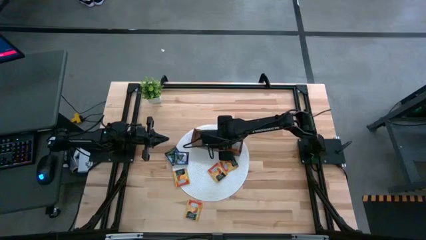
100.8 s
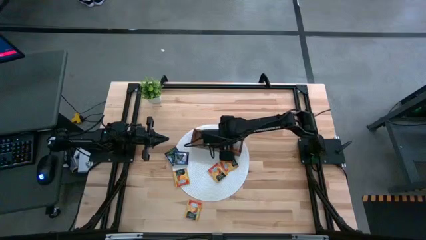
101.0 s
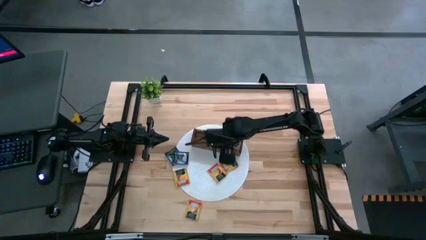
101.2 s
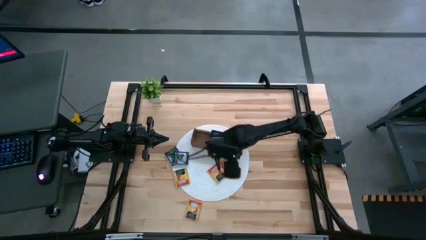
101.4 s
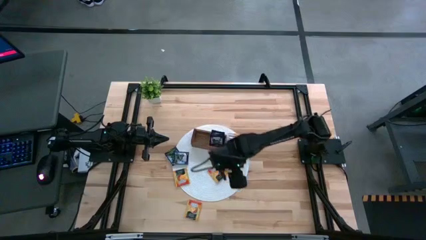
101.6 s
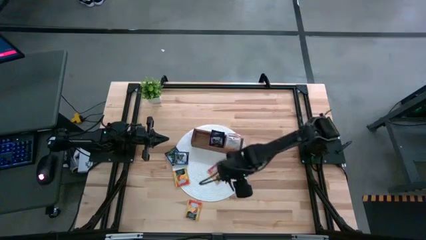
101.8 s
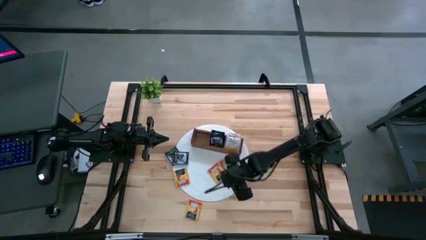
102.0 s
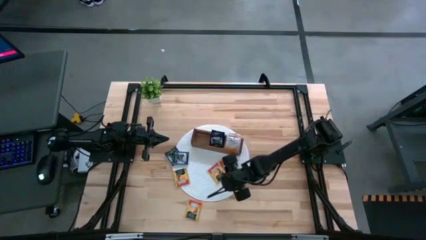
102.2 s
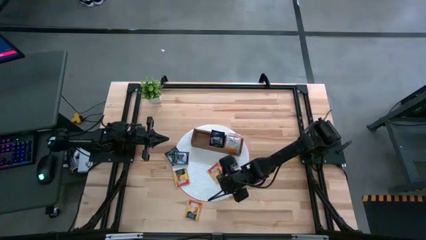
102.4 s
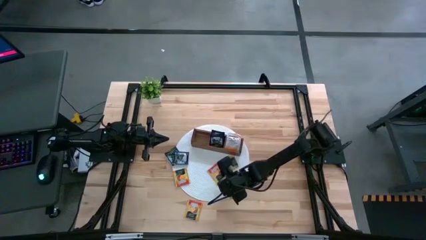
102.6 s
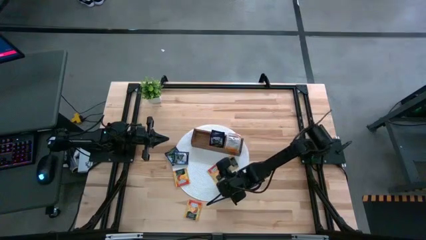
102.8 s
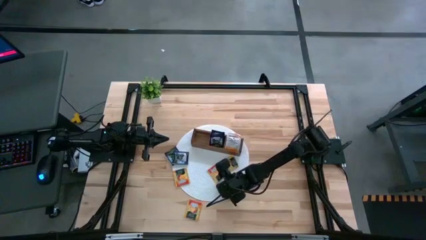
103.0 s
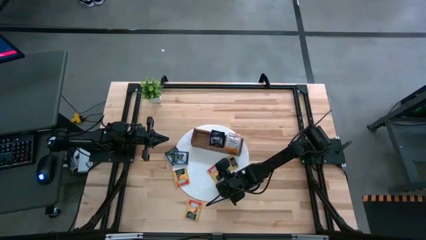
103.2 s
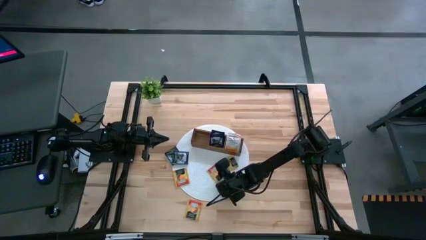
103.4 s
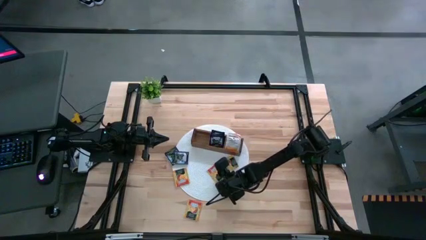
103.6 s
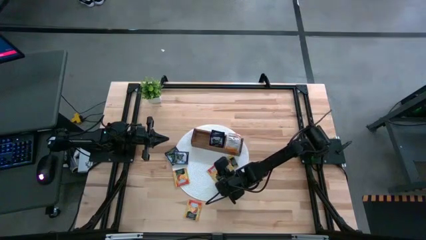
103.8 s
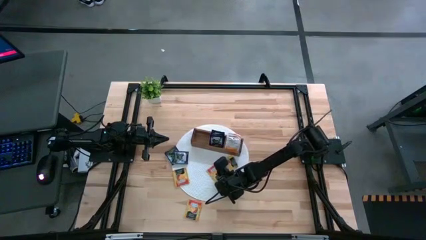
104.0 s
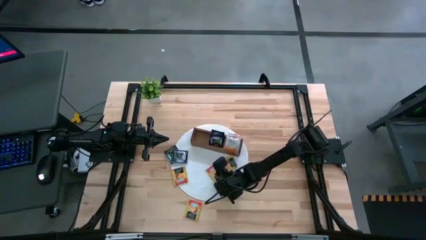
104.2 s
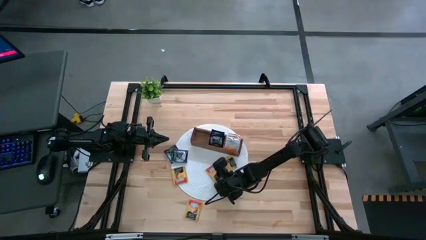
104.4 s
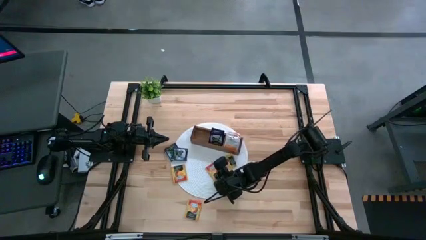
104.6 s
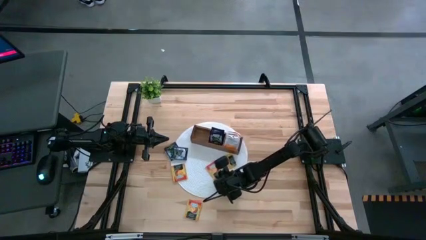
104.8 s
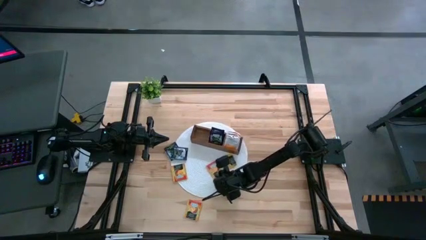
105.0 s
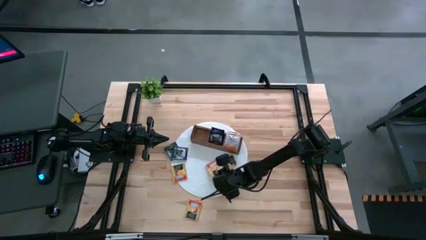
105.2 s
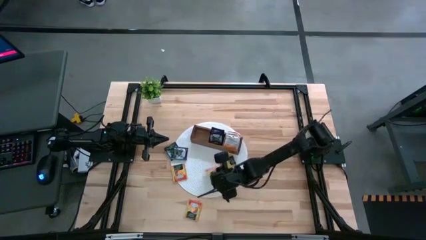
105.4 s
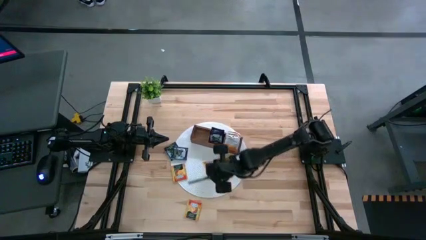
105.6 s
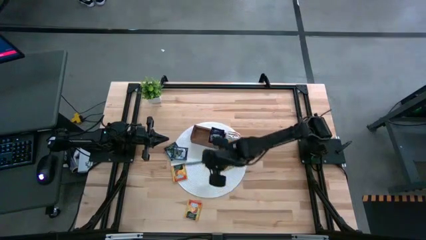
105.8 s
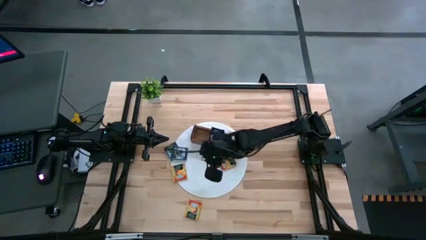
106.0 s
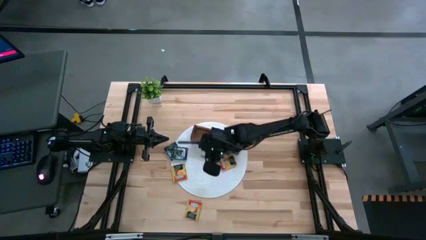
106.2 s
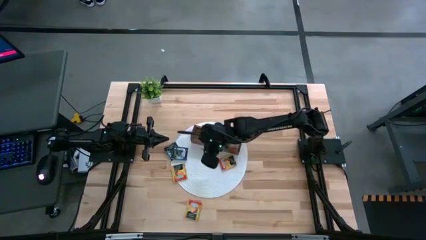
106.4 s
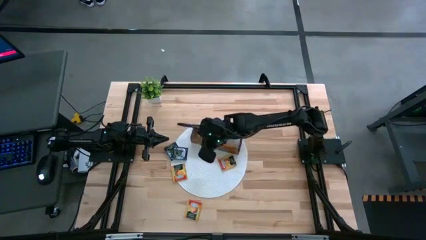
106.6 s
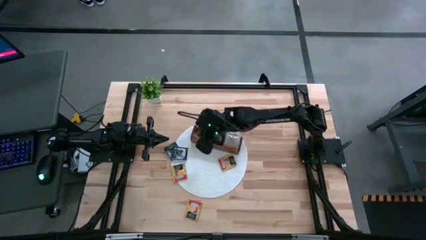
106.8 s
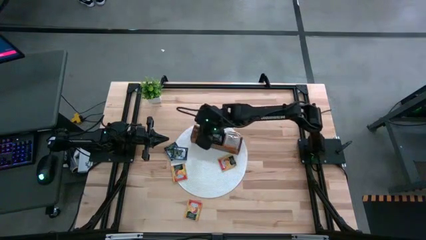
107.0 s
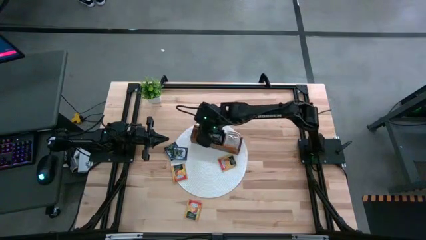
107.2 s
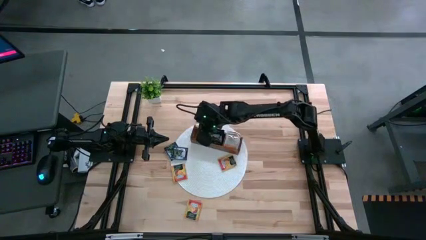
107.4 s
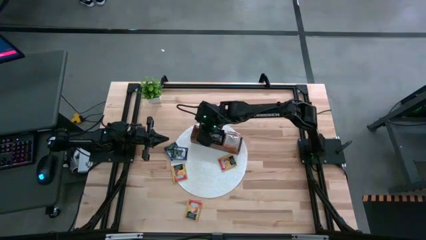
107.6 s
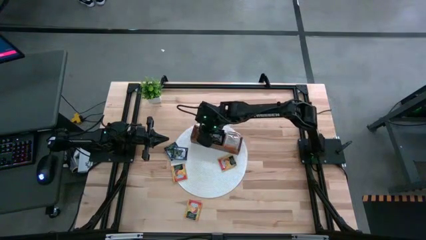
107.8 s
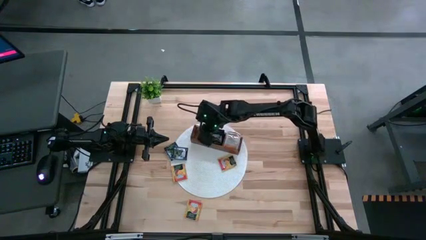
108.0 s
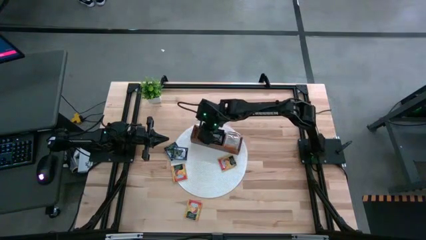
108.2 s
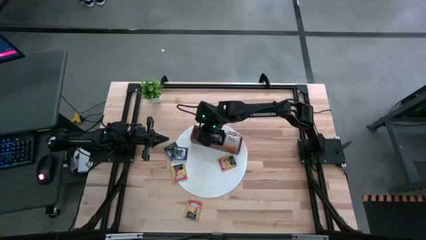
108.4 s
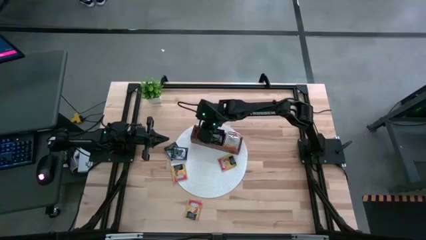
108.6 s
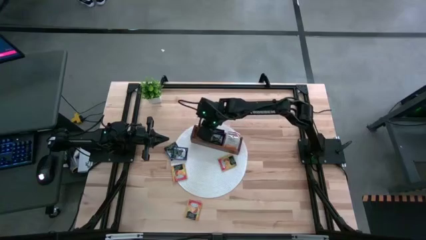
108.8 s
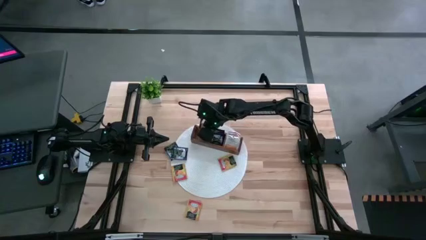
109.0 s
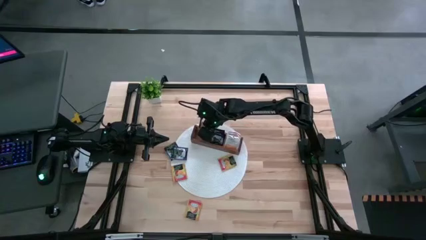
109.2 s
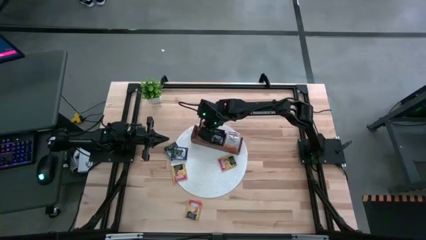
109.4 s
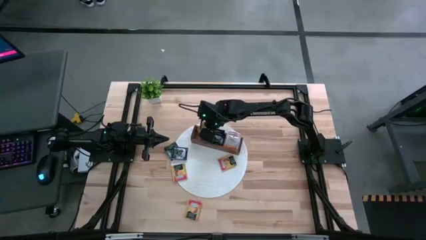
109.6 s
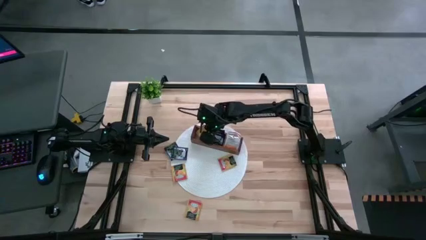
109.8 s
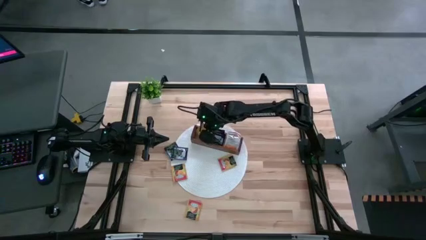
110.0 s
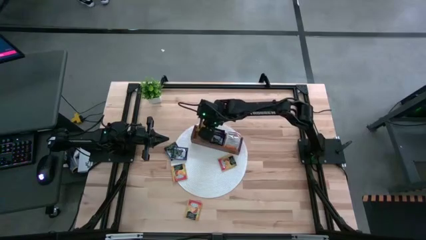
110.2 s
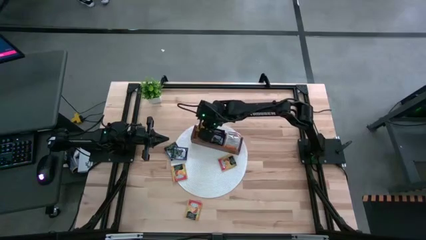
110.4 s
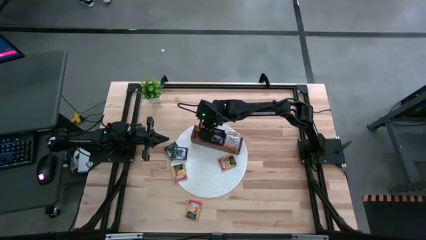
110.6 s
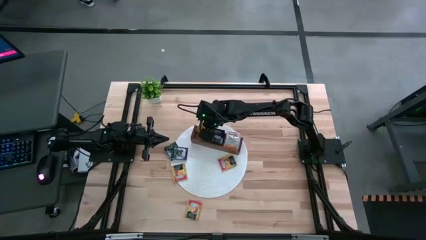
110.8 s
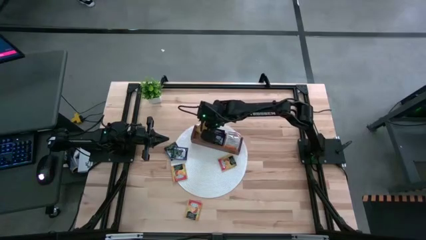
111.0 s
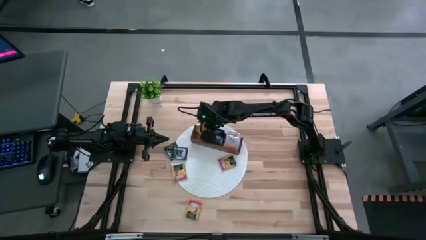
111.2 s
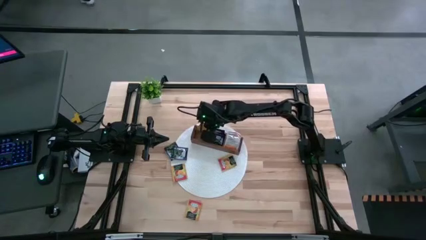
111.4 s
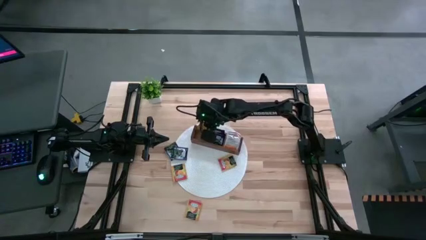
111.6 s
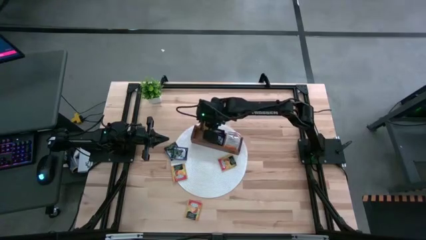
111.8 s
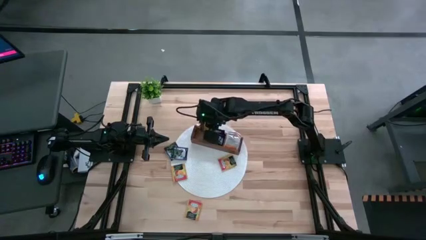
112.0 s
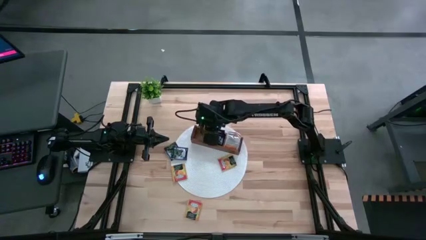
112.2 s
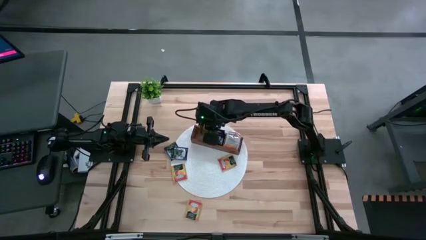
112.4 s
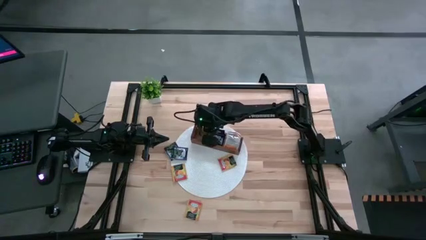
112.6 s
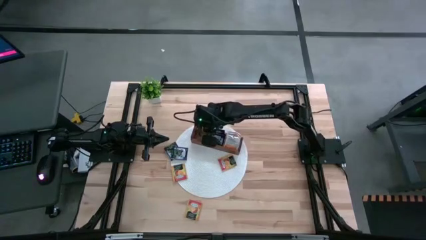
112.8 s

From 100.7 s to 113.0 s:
Task: Pick & Place Tea
Put the orange tea bag into the left section of the wooden organizer
